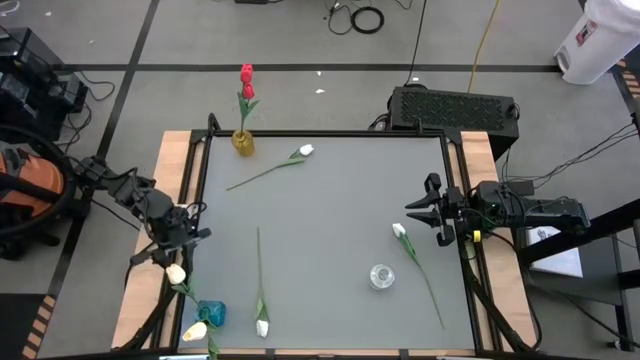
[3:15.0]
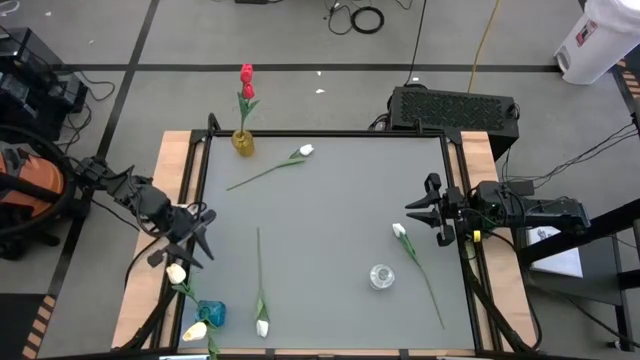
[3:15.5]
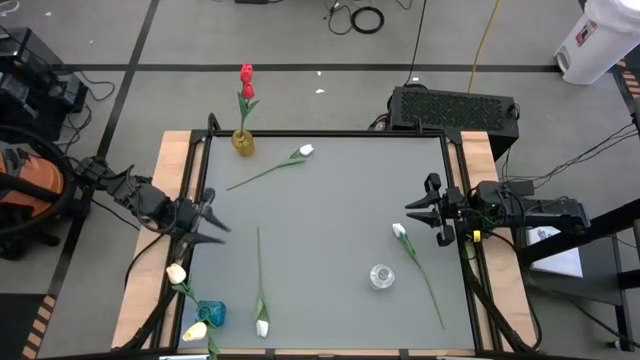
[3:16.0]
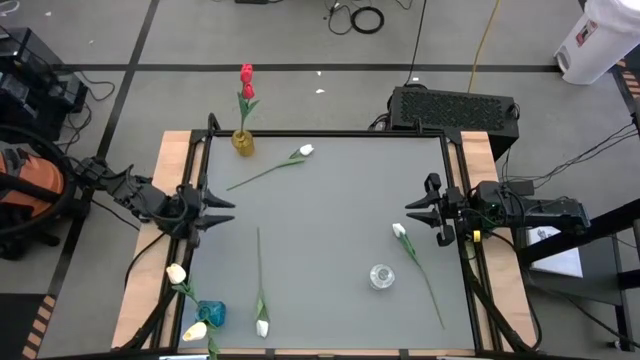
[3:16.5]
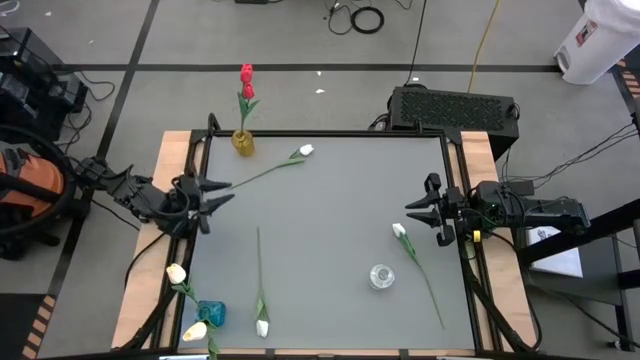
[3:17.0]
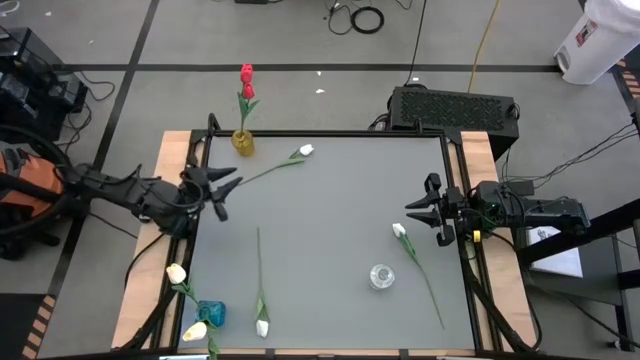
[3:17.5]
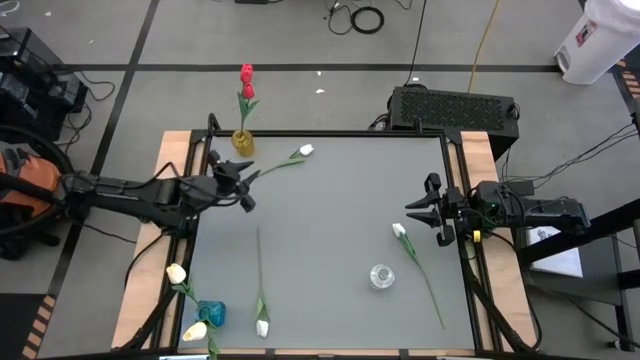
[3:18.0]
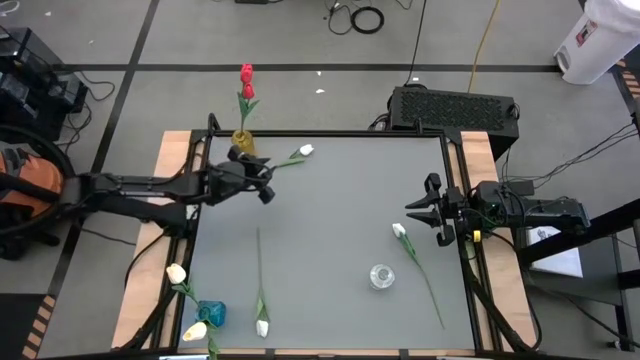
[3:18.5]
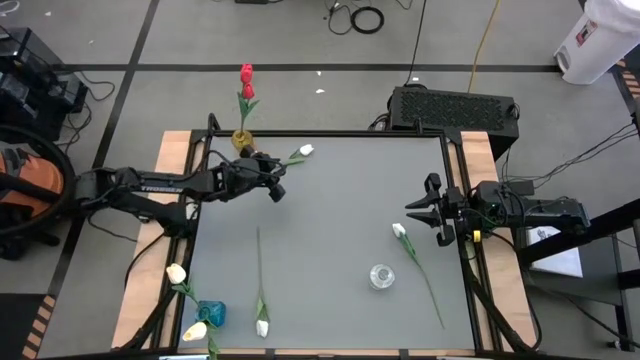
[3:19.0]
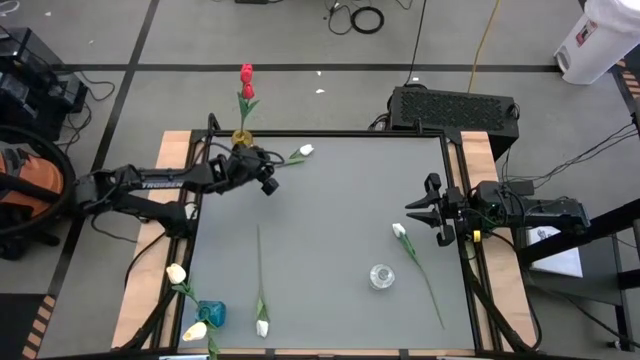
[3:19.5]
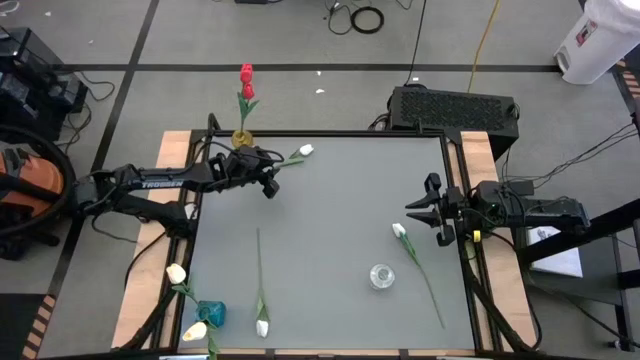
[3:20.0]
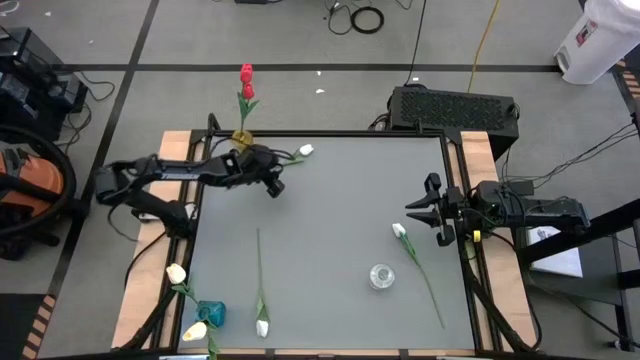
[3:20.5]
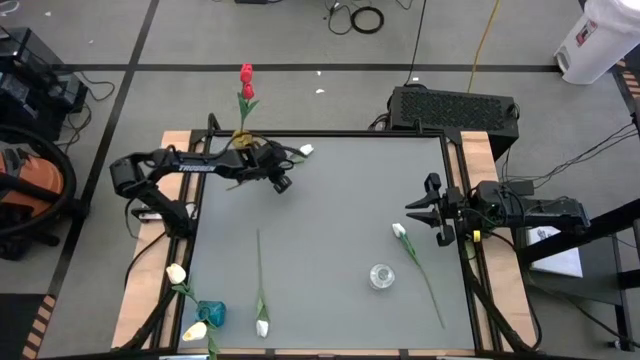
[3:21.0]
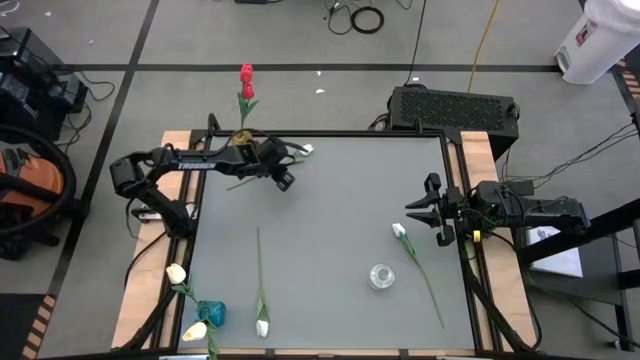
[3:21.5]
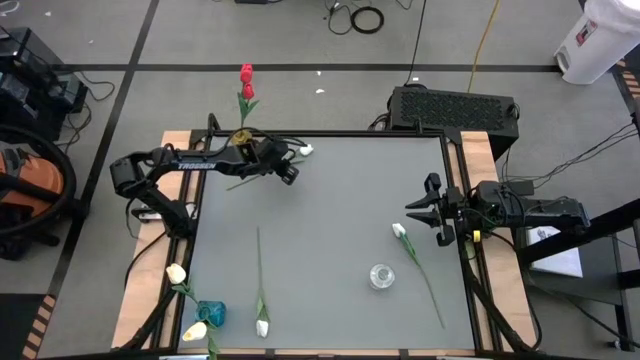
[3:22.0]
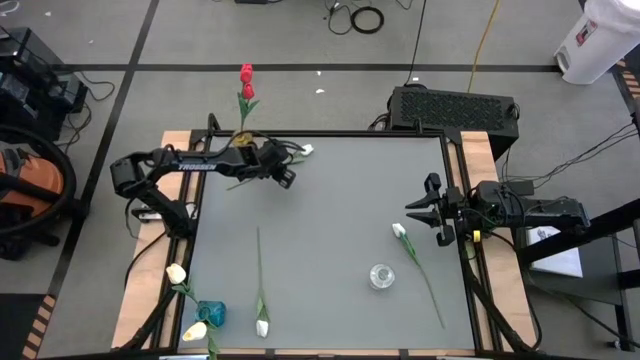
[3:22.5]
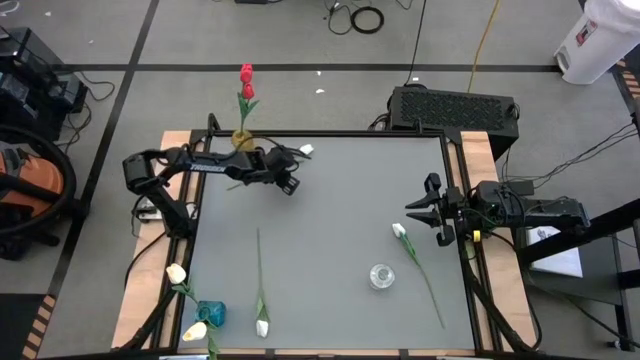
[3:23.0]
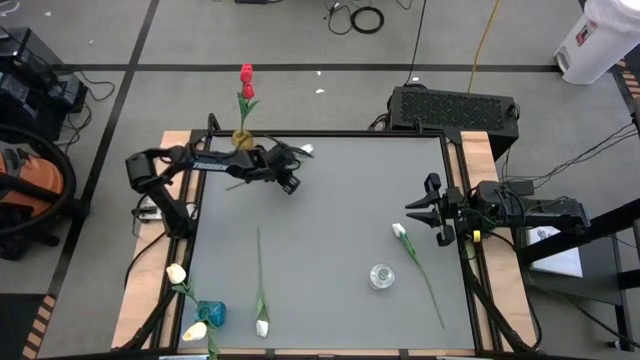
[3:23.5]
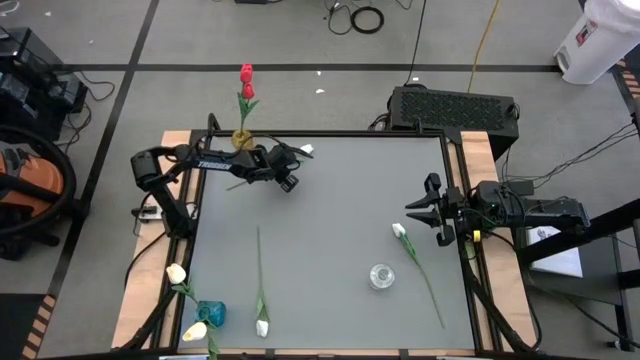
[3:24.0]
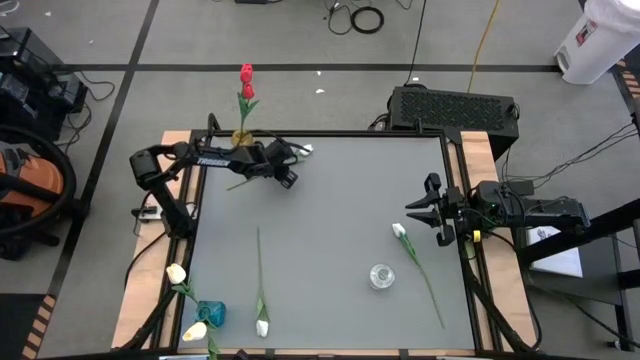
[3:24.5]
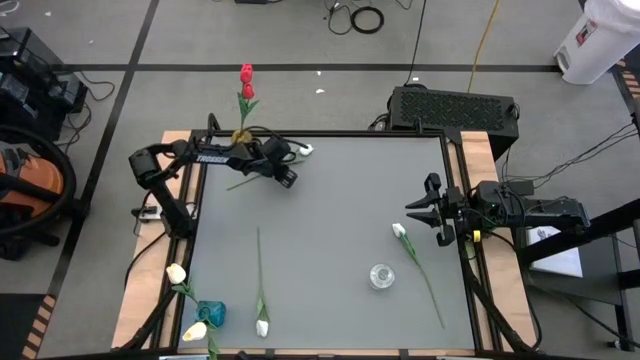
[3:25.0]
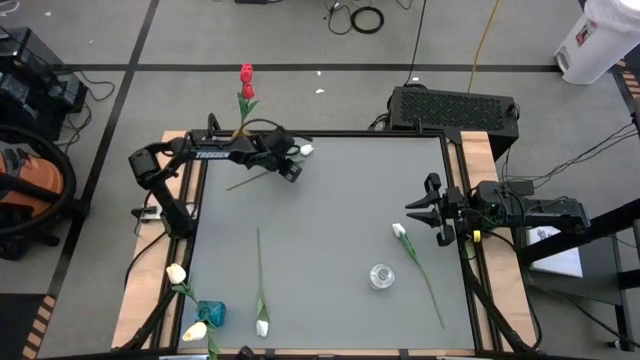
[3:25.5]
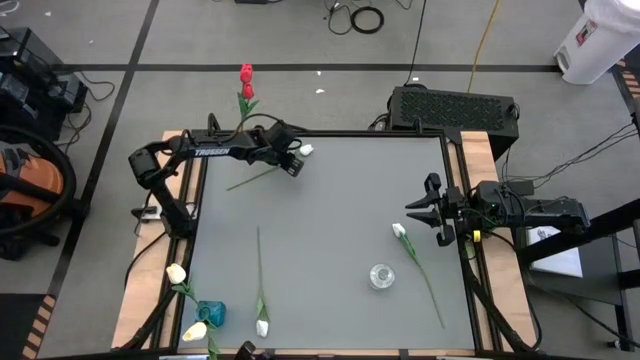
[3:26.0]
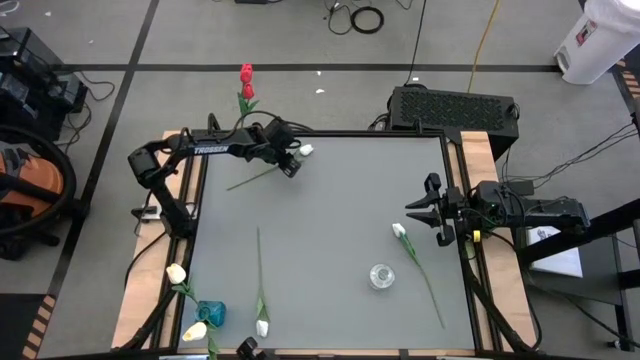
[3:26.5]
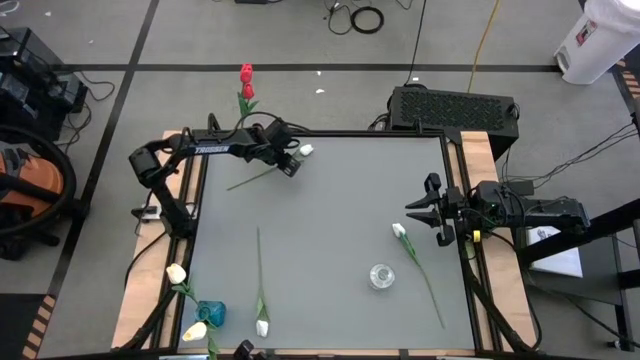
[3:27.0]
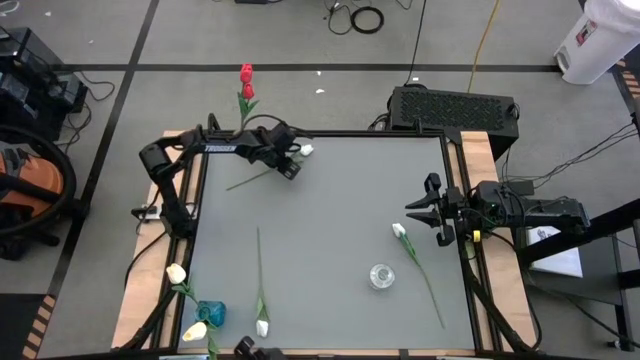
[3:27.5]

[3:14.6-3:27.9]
Task: Sort flowers into vase by color
Put the top white tulip into the transparent vase
